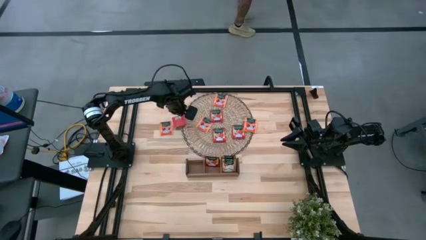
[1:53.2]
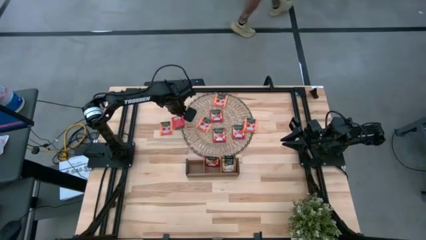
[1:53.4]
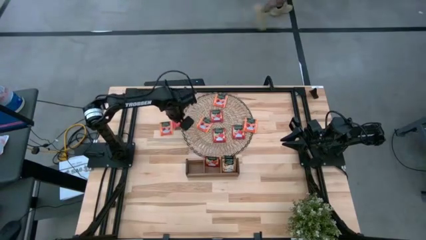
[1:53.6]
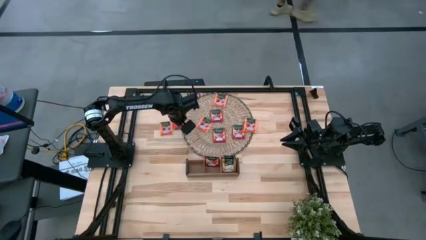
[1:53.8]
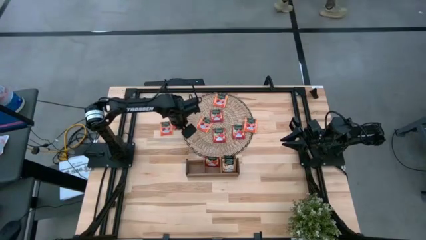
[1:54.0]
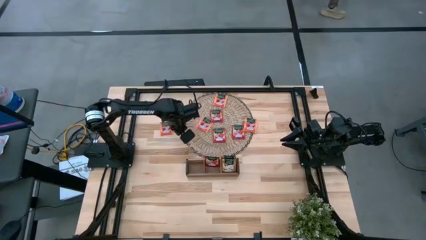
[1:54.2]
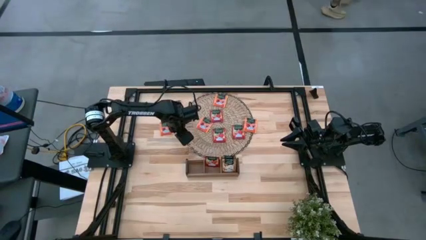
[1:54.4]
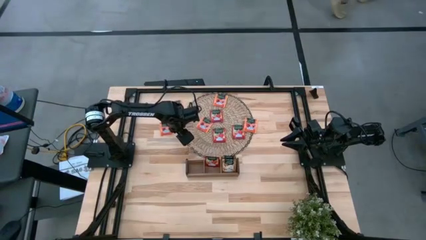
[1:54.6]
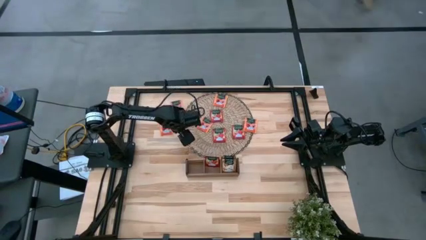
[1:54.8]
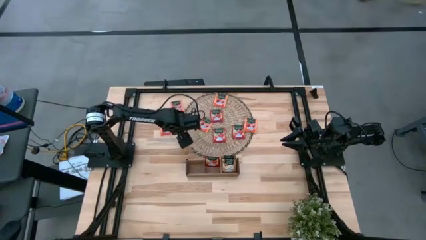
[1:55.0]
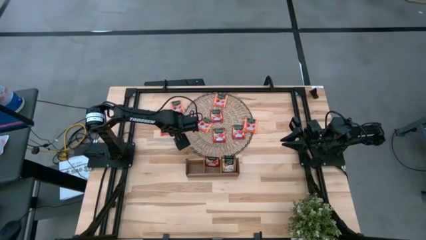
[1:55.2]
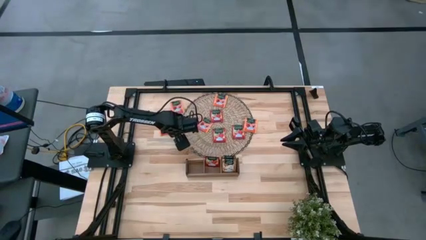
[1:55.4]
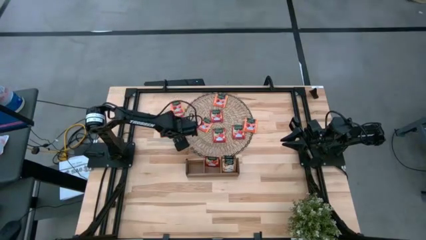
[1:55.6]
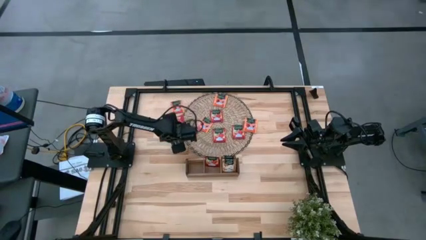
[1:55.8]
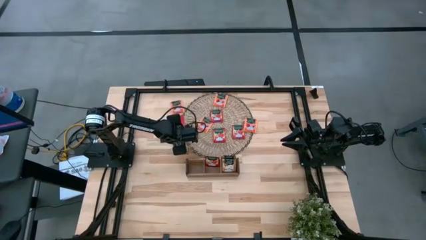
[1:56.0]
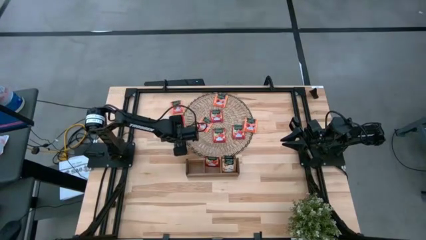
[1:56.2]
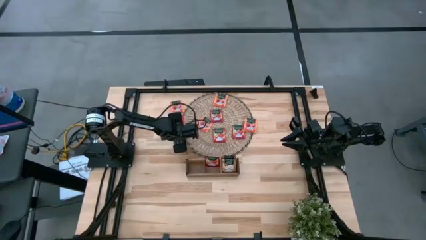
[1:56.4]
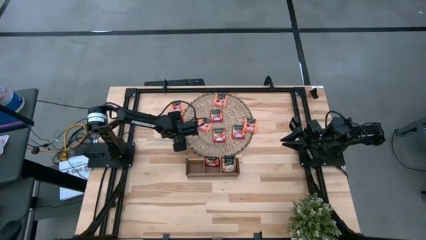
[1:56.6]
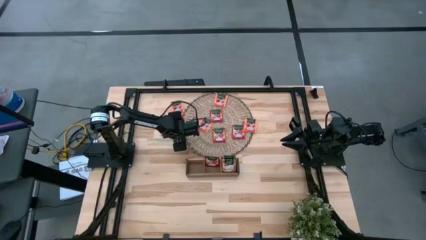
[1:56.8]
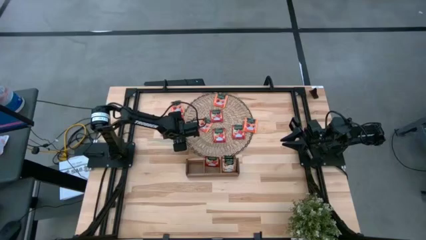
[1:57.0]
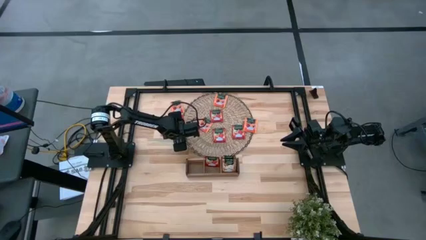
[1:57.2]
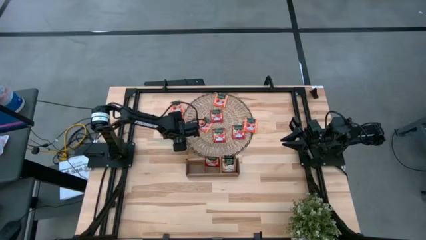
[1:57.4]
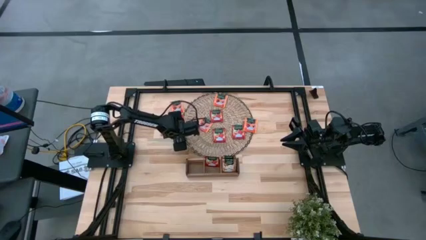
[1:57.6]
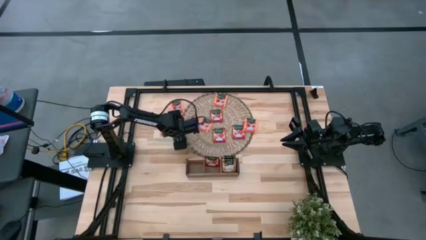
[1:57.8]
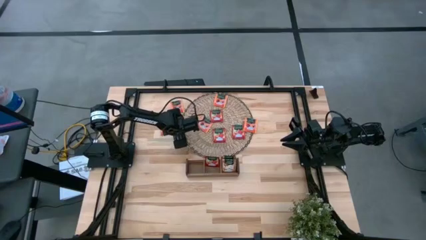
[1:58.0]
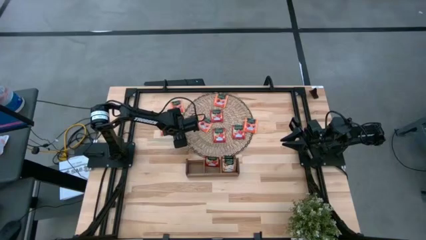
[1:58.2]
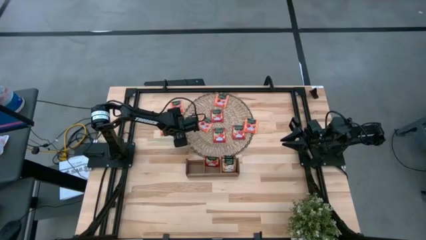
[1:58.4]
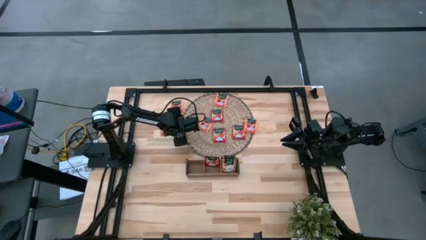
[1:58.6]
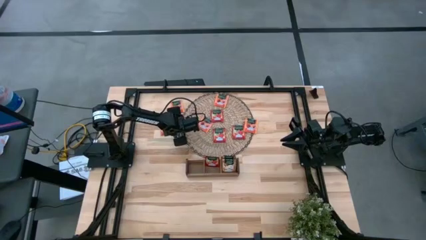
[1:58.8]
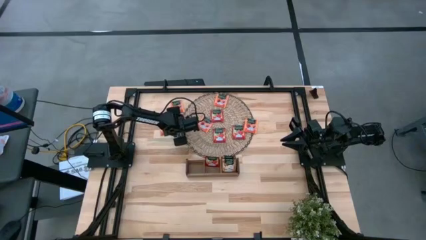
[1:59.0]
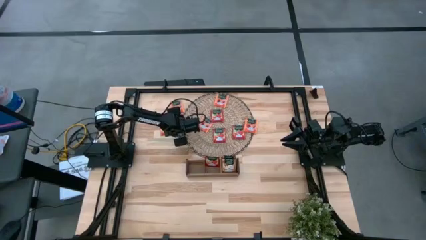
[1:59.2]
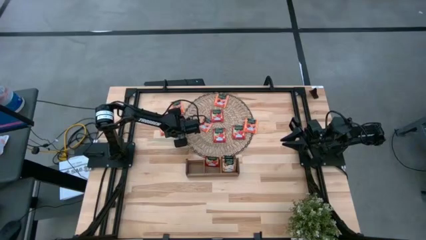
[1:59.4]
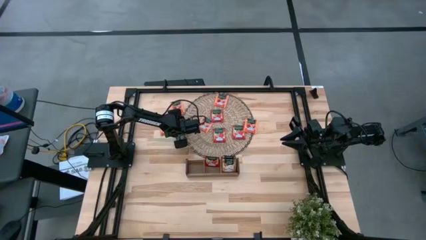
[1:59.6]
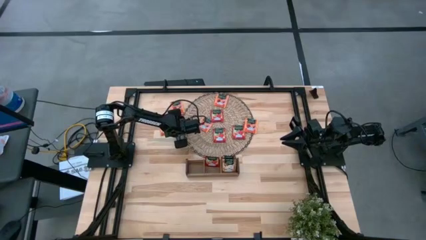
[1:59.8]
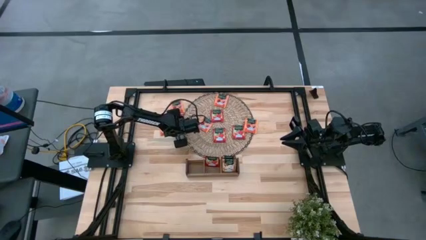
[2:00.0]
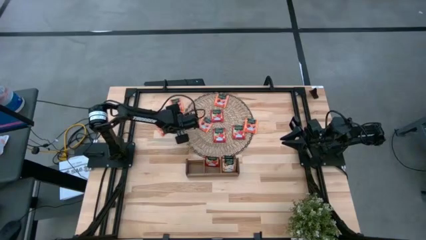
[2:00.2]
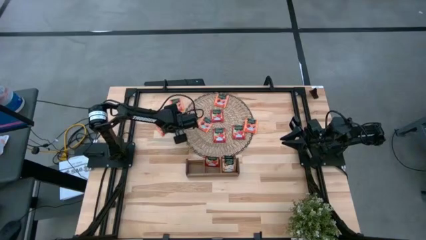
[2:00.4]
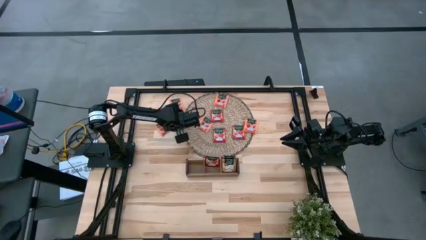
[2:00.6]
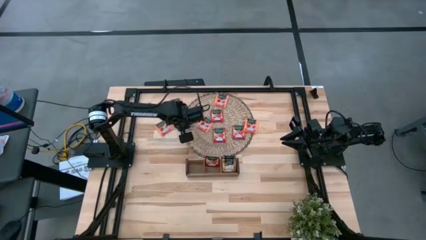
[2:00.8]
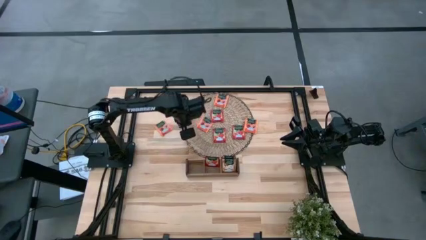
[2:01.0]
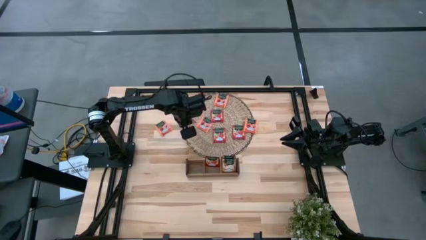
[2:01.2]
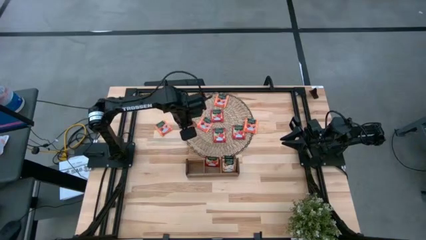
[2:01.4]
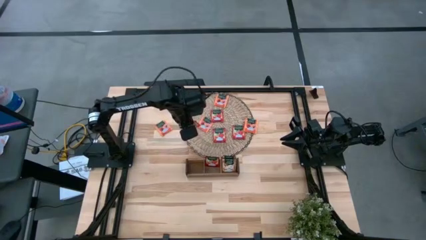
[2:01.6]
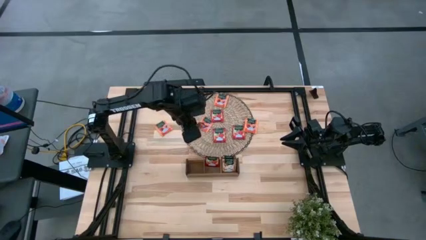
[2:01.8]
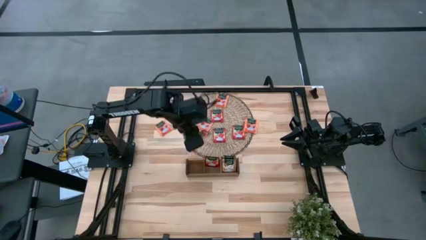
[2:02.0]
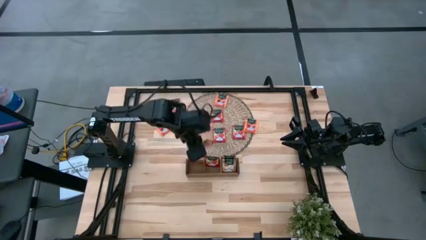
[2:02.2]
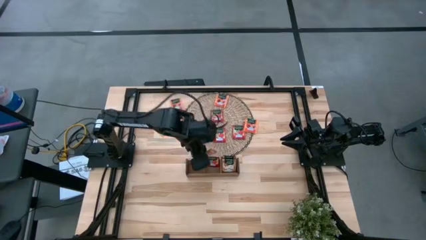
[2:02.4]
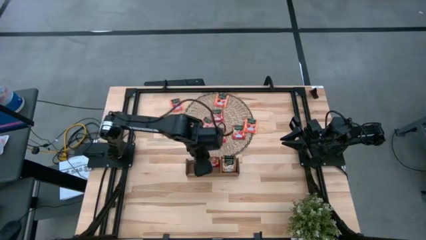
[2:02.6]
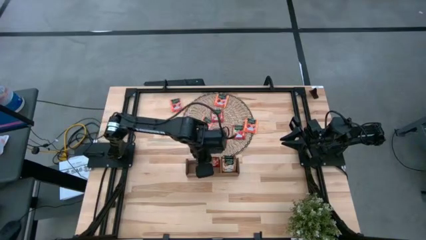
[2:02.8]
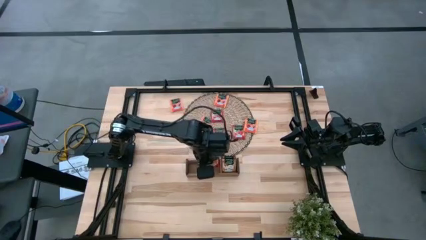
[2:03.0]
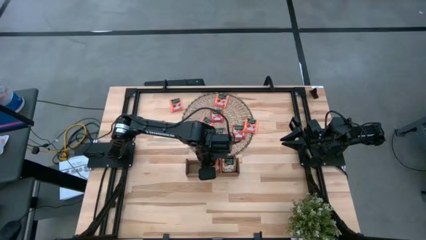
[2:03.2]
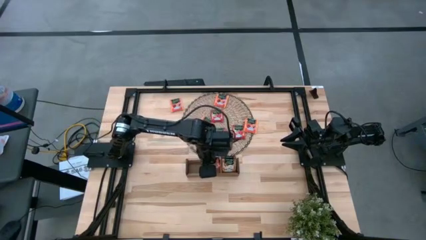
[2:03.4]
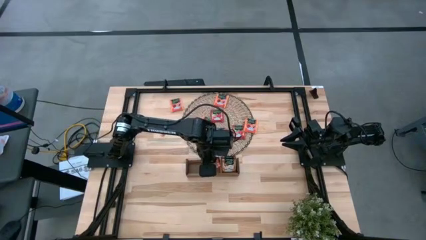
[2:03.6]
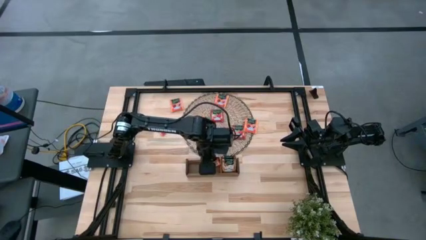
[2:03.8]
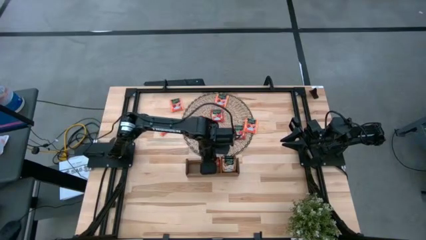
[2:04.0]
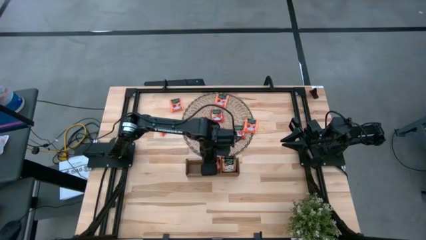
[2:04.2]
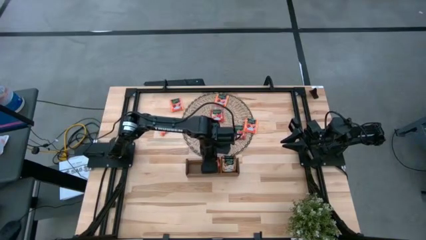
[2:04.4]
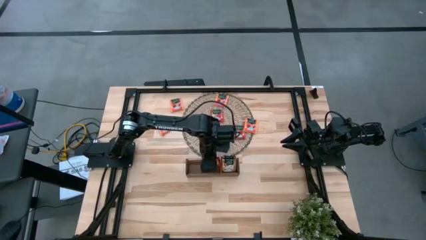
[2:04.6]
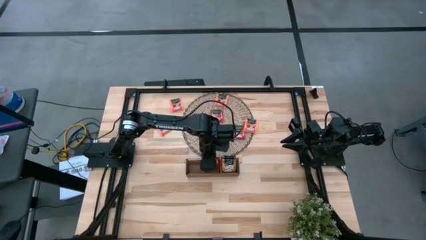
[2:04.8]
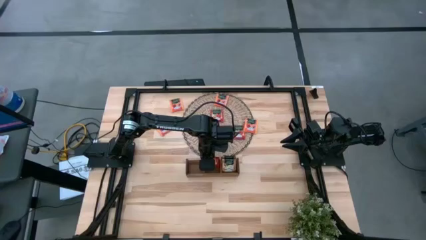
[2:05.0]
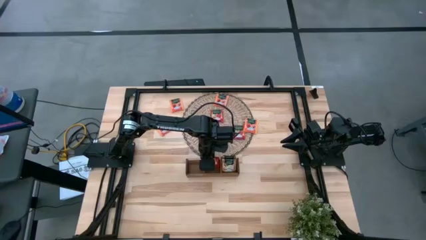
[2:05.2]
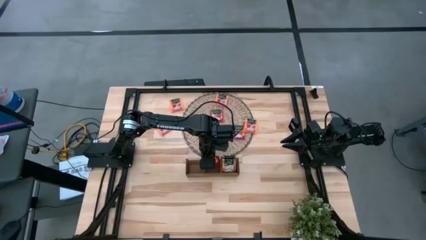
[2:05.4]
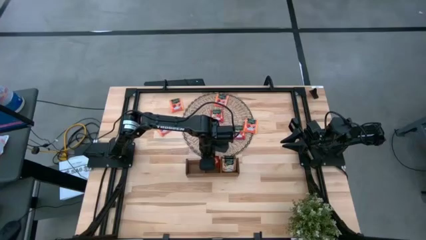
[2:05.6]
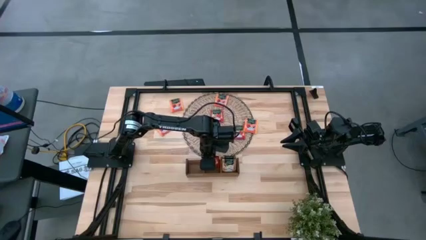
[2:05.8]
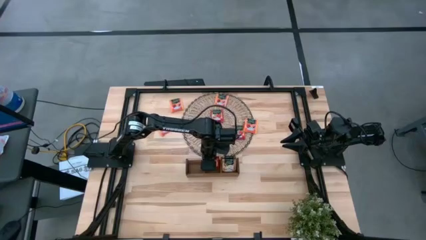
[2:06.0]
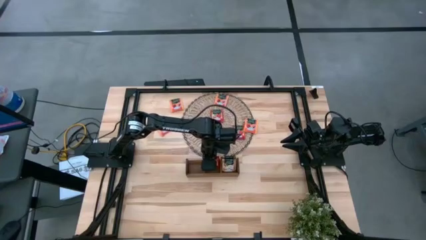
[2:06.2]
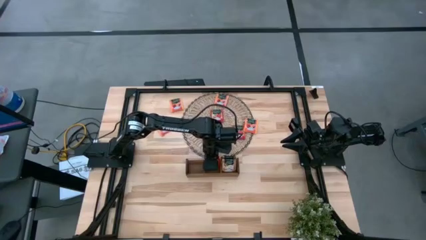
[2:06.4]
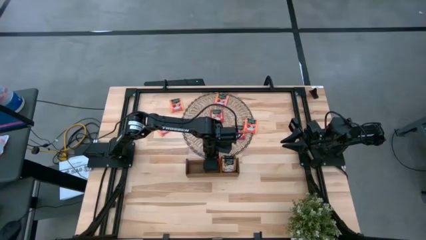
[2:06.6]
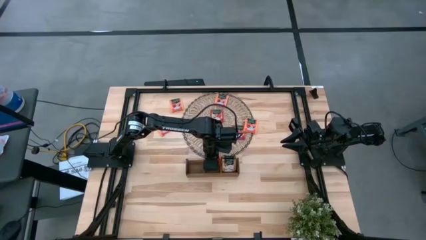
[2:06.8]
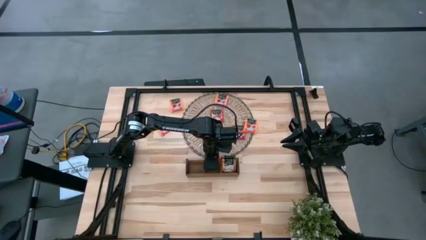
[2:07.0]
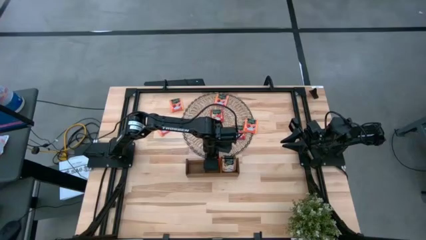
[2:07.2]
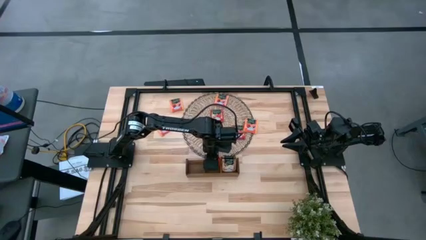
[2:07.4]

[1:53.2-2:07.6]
Task: Pick & Place Tea
Put the red tea bag into the middle section of the wooden organizer
